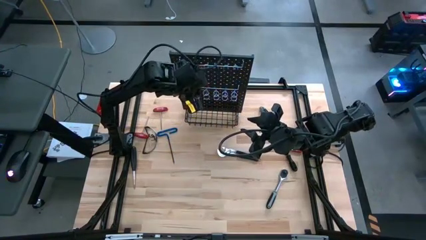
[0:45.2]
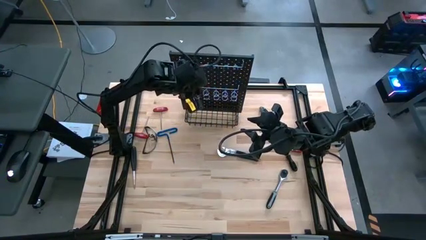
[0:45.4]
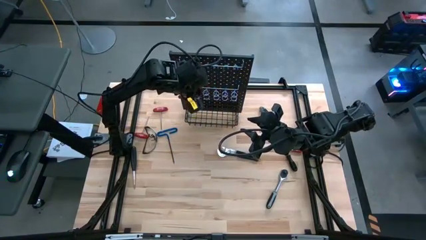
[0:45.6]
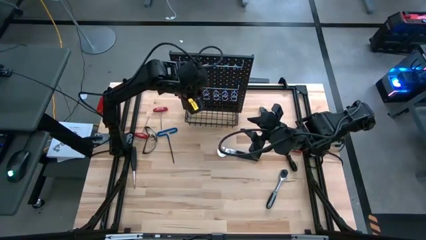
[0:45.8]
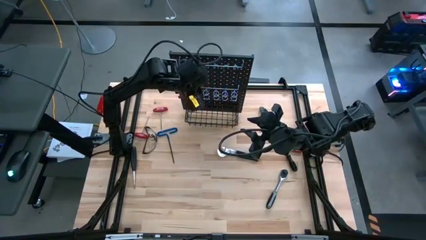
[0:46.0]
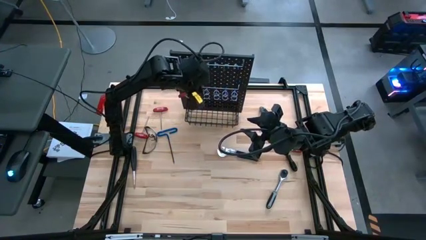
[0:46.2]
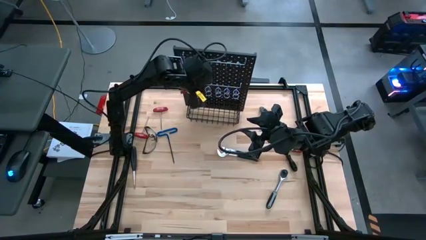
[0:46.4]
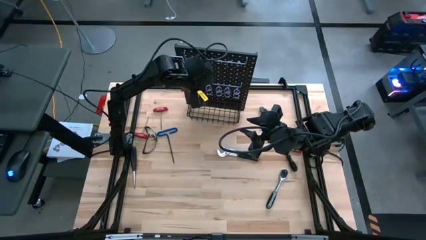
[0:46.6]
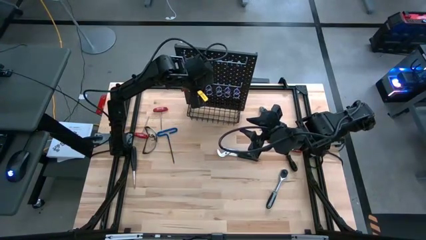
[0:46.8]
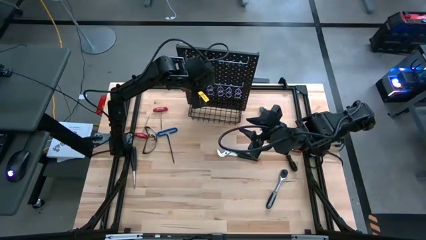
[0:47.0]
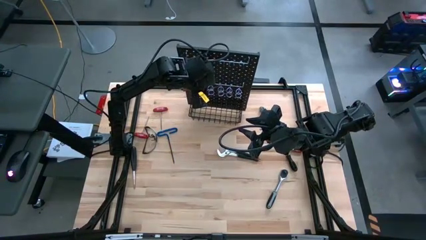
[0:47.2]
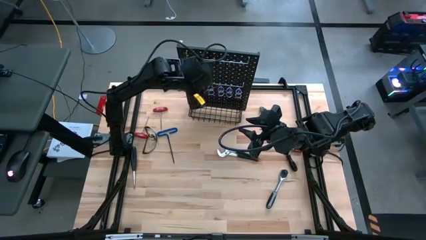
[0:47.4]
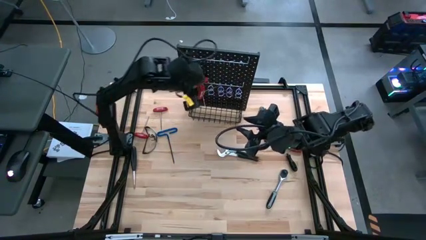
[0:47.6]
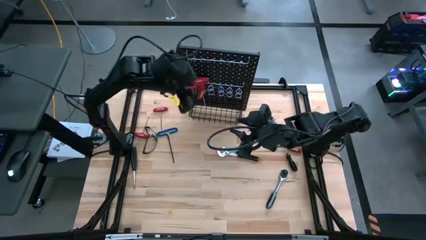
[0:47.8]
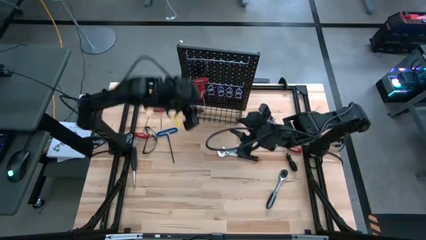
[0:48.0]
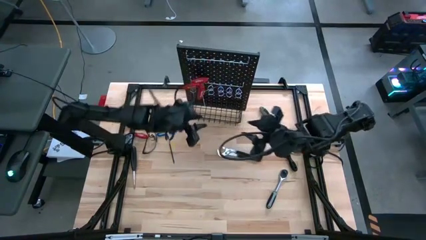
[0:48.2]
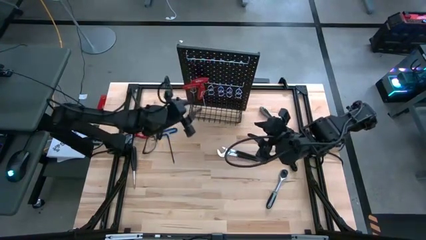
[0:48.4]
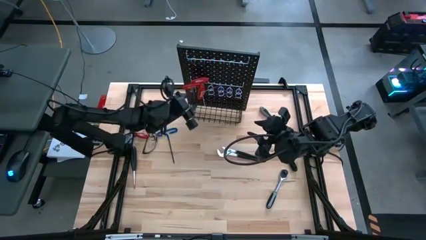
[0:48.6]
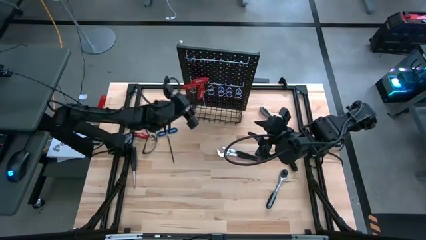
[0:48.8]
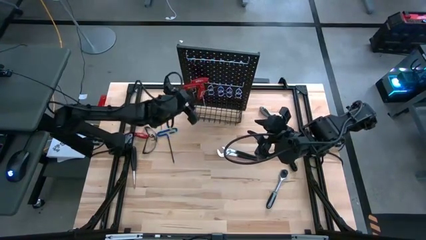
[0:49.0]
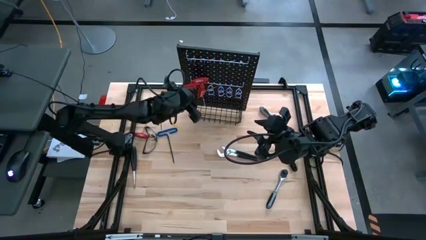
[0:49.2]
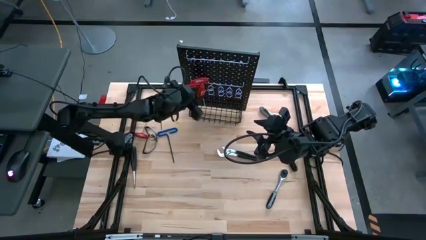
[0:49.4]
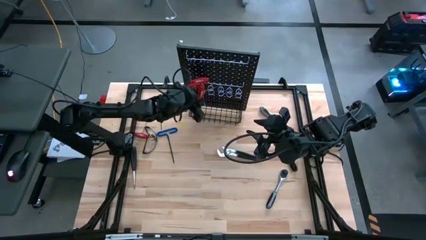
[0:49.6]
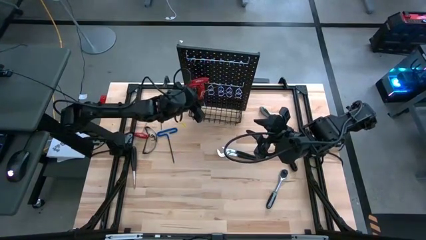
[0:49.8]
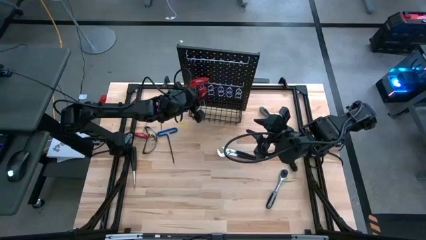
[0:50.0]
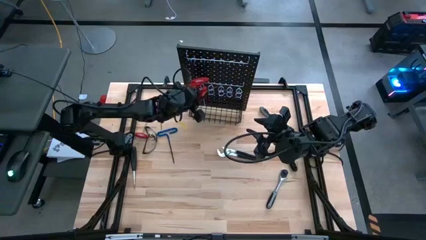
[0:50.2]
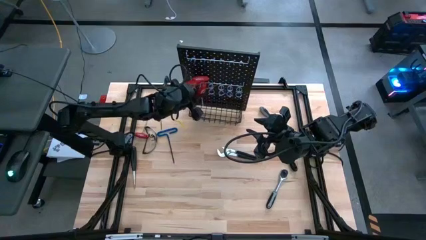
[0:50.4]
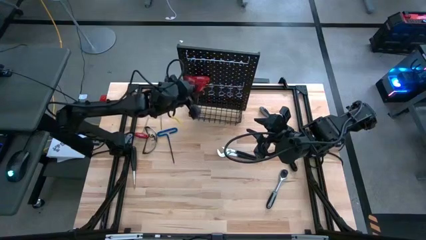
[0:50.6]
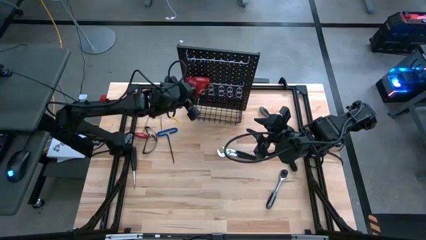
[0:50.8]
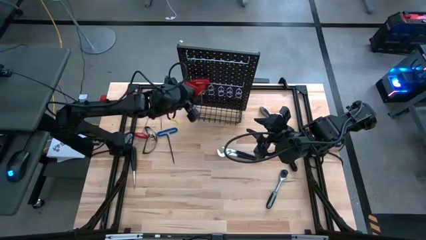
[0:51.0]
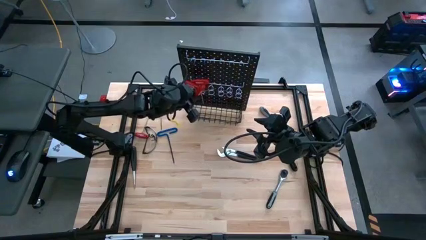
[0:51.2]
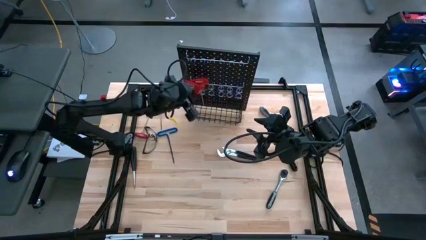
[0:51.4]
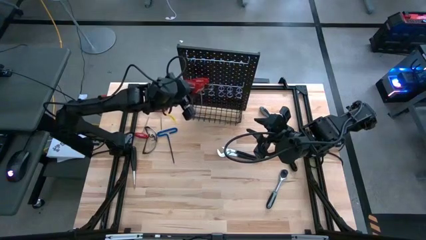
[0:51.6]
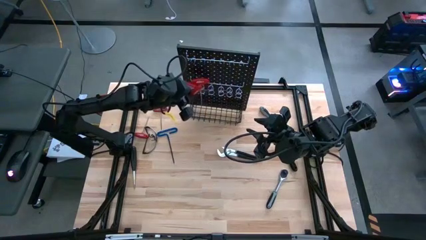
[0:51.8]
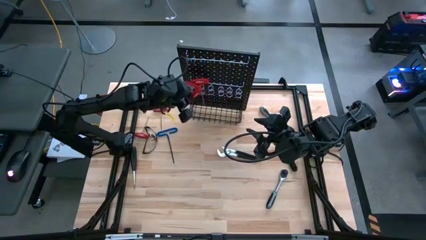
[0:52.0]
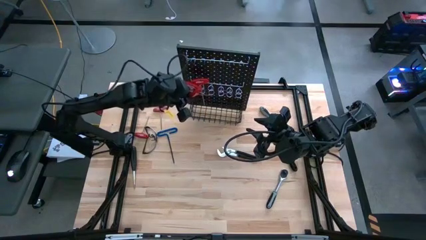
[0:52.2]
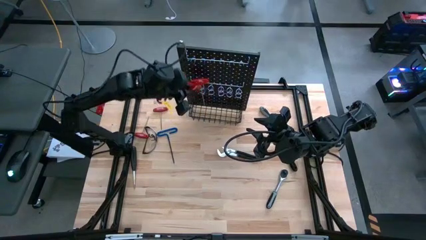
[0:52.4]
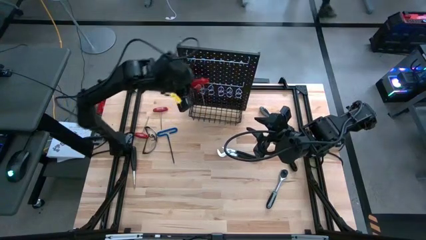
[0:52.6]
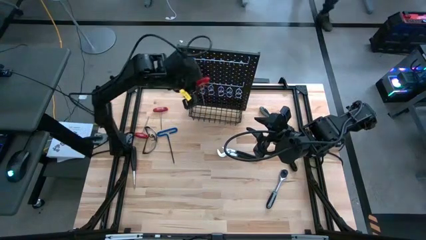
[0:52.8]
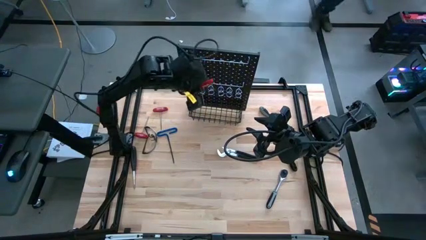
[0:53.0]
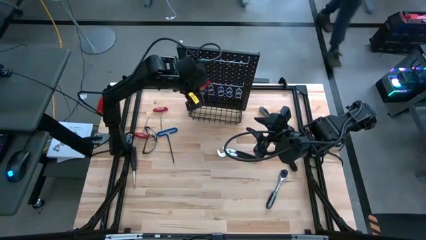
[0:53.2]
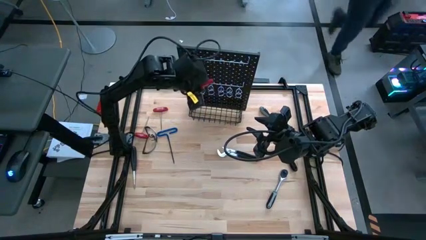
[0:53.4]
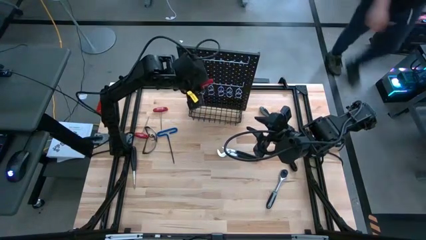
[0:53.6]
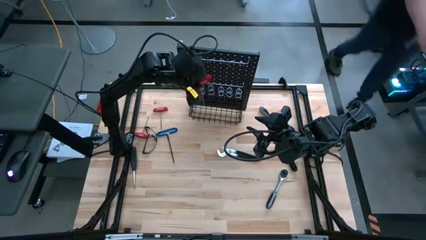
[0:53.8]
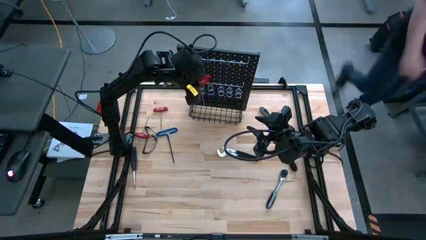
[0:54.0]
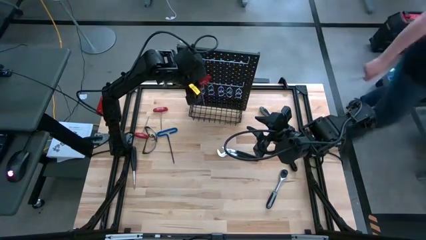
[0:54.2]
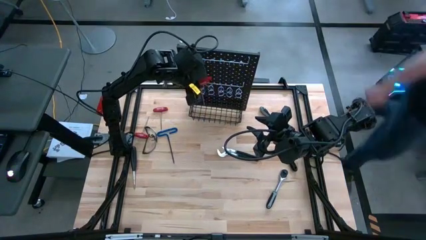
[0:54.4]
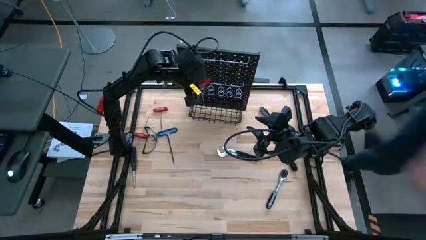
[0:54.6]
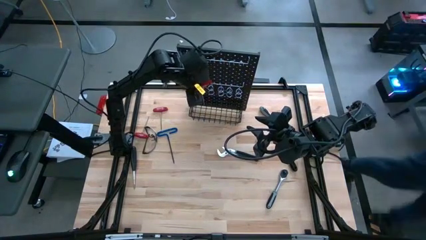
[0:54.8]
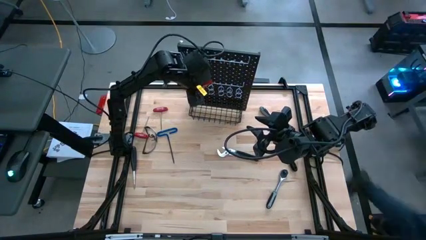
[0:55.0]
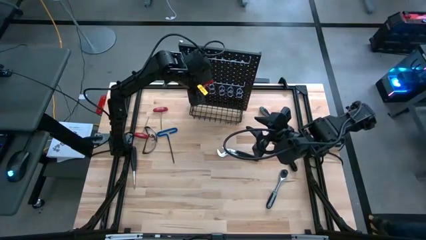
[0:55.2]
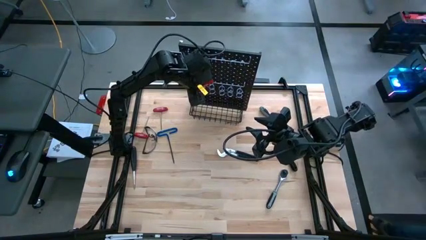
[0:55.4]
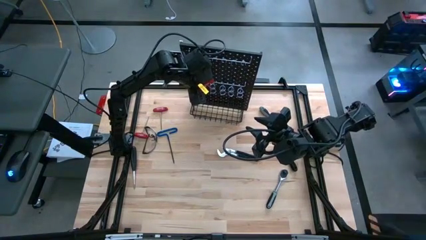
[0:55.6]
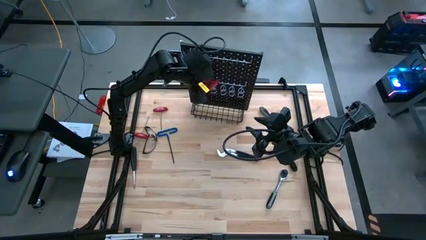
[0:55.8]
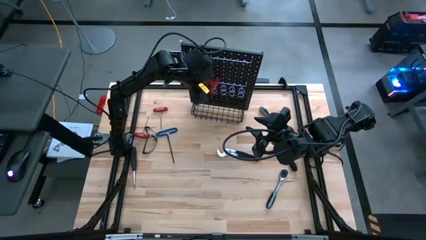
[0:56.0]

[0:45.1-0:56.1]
Task: Hang tools onto peg board
Hang the bottom red allen wrench on the peg board

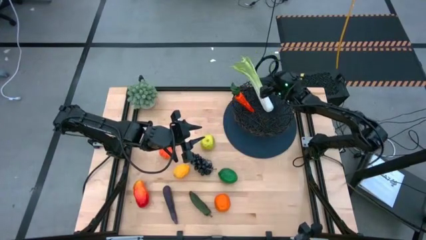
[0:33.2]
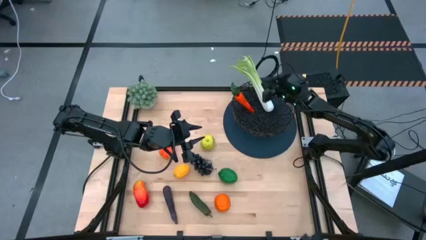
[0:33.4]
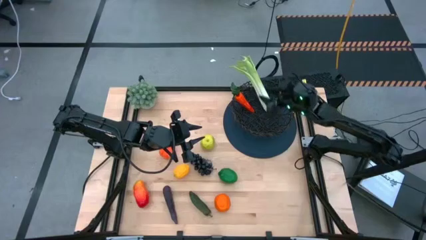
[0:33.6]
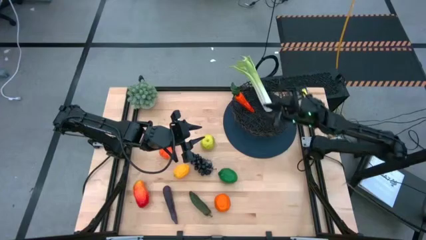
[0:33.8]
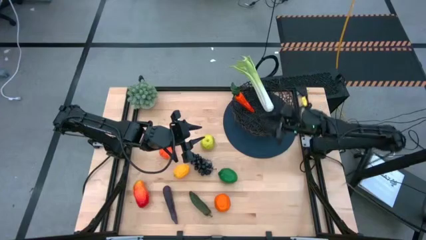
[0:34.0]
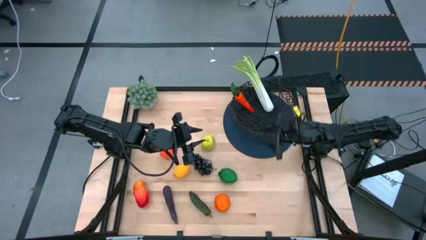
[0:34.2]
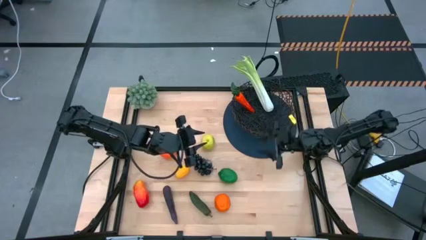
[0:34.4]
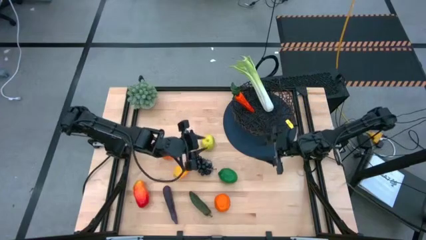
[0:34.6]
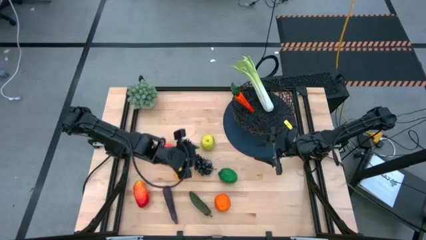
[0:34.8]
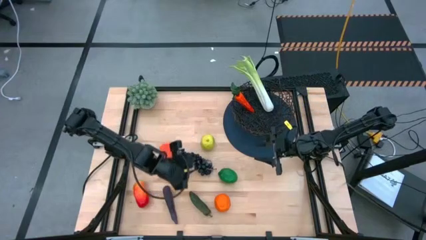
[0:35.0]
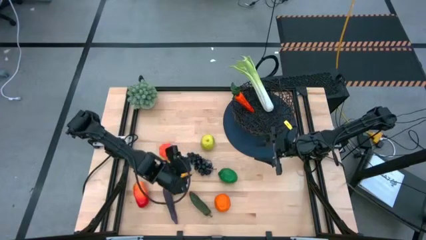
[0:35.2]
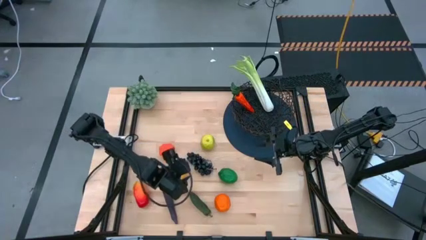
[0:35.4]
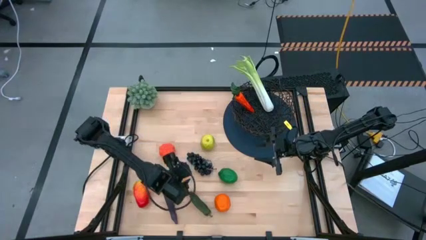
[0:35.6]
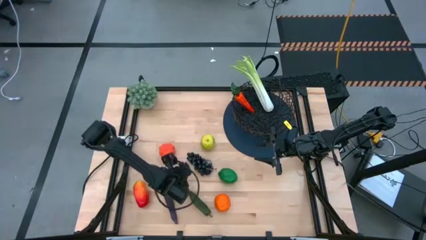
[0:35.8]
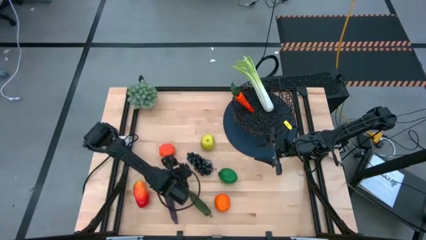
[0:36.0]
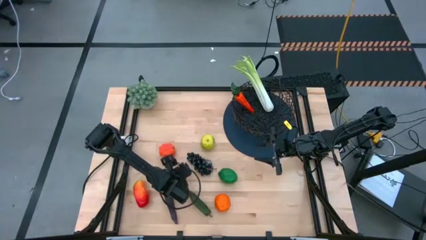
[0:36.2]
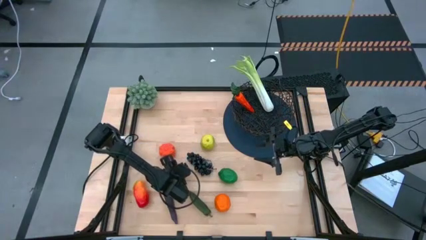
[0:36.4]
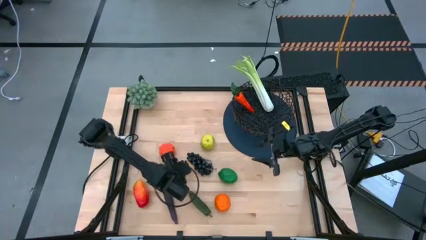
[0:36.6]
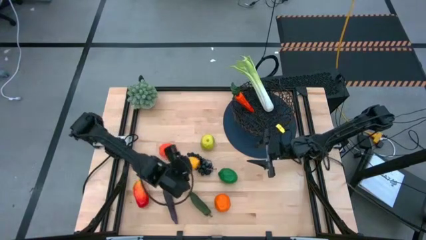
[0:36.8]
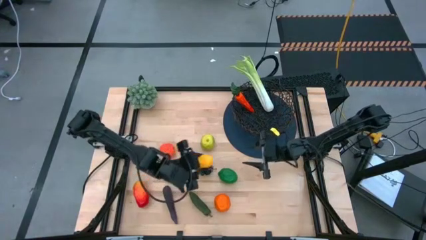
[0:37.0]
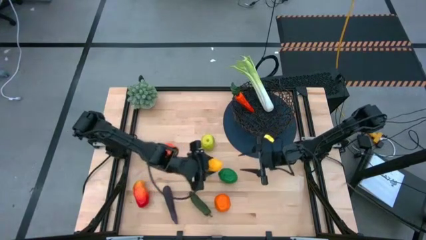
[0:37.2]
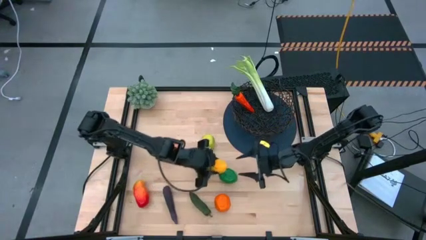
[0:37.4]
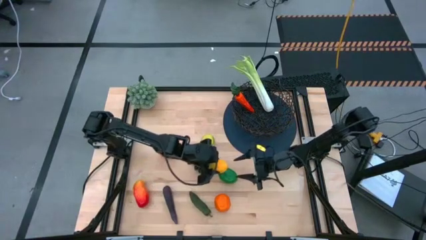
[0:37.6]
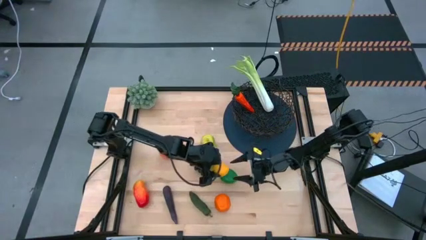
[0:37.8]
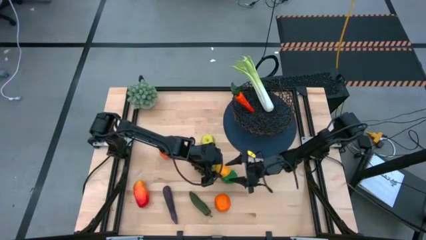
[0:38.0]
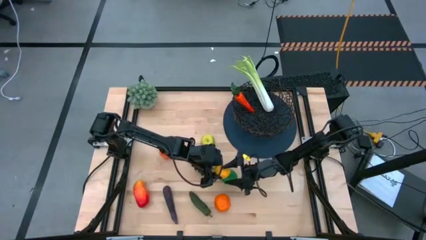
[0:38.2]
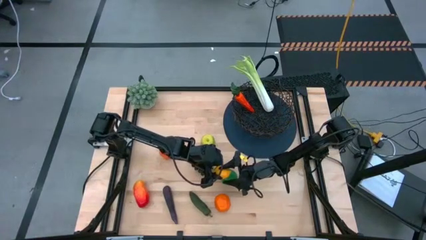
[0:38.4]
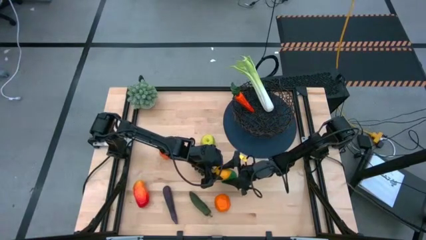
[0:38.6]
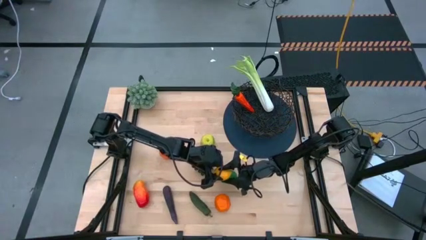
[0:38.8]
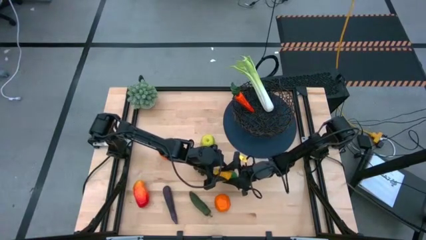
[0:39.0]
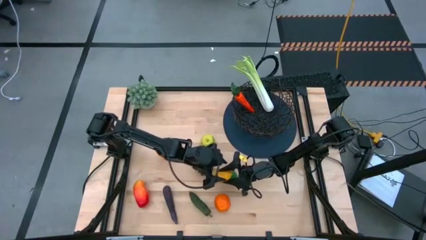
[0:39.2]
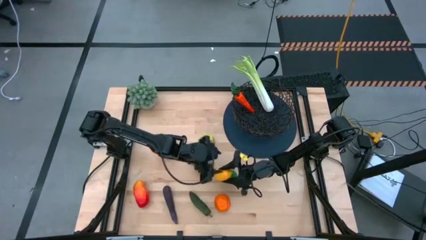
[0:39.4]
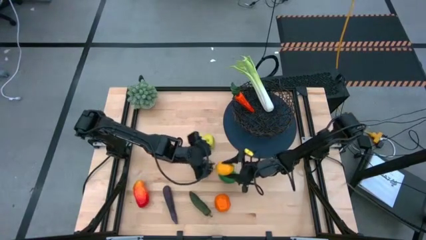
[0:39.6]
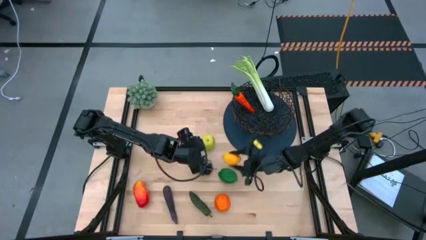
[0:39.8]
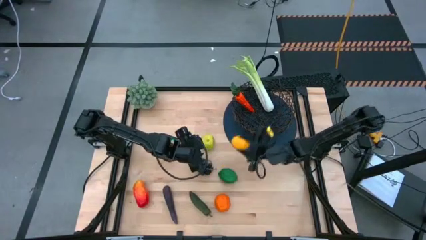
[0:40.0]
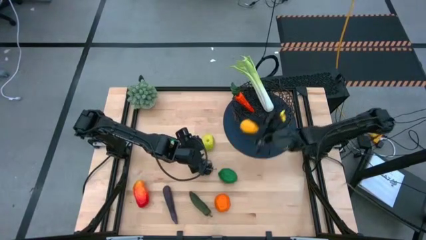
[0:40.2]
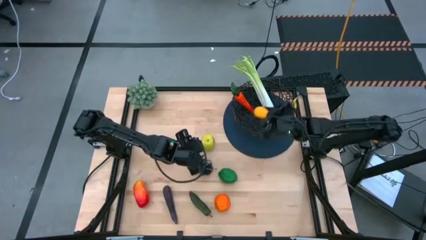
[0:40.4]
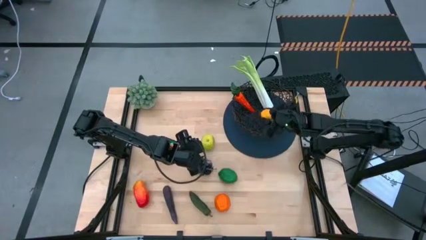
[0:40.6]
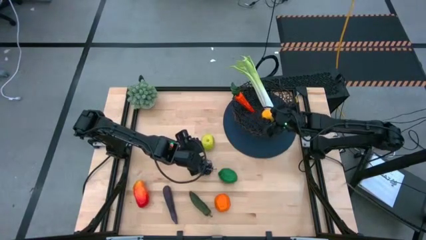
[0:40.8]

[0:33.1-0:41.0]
Task: Build produce basket
Put the yellow lemon into the black wire basket
